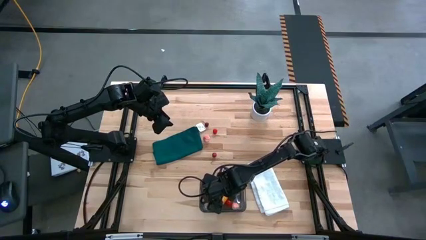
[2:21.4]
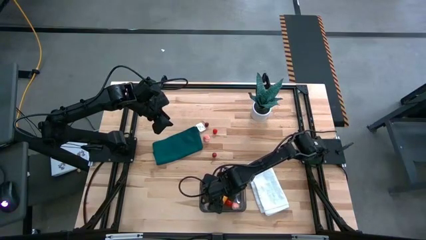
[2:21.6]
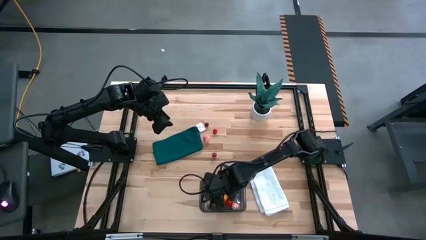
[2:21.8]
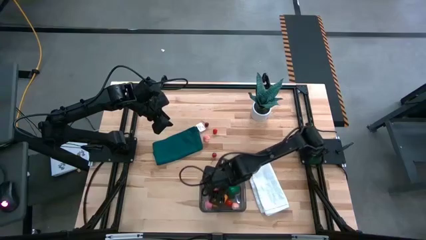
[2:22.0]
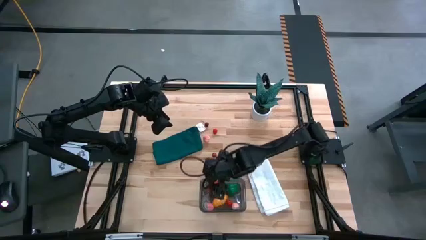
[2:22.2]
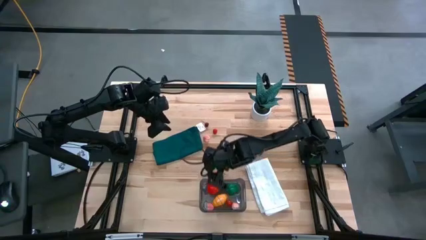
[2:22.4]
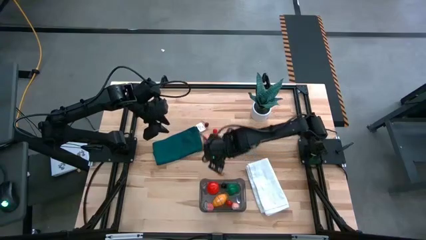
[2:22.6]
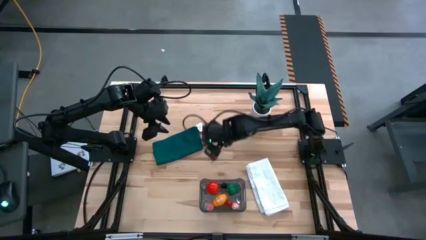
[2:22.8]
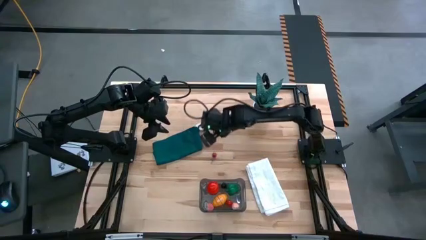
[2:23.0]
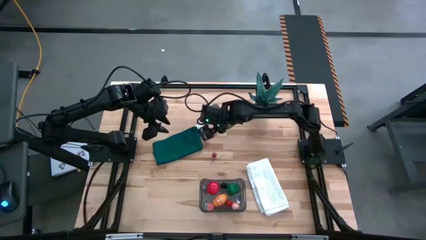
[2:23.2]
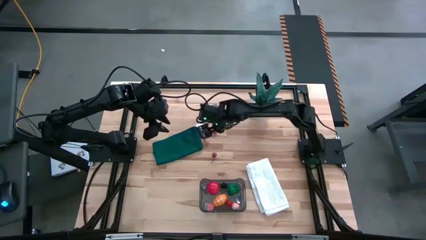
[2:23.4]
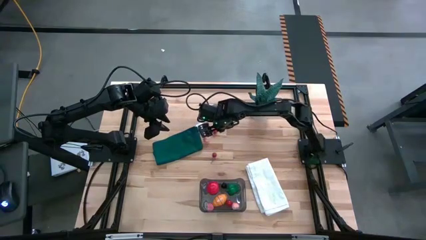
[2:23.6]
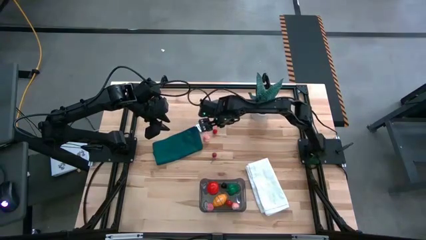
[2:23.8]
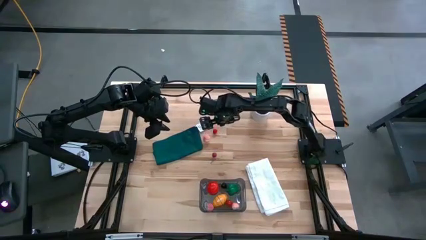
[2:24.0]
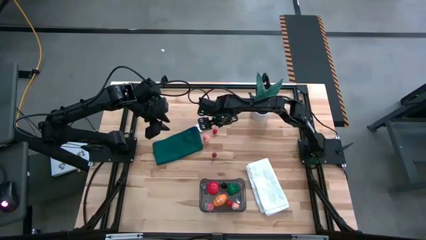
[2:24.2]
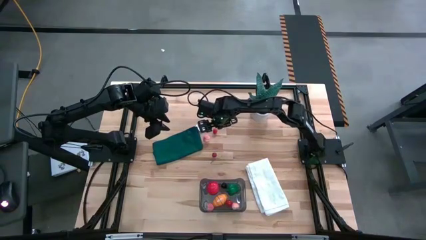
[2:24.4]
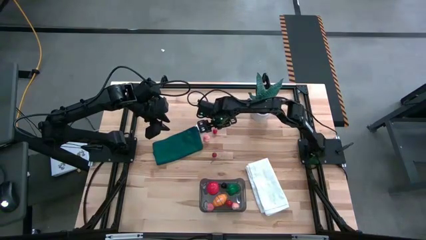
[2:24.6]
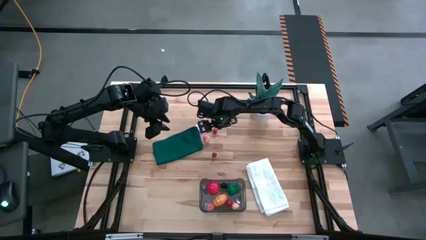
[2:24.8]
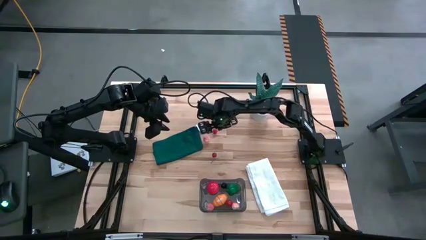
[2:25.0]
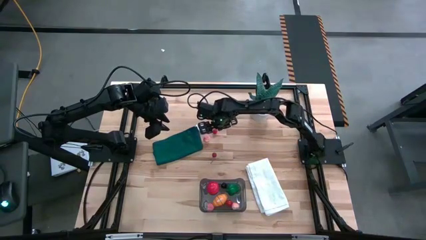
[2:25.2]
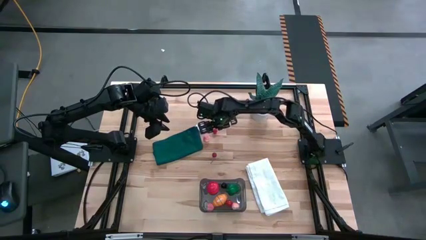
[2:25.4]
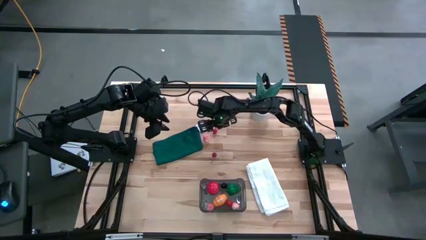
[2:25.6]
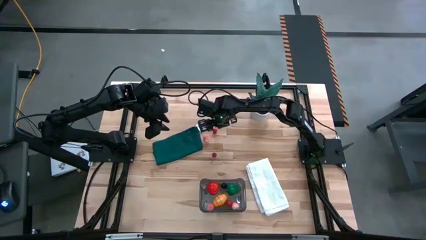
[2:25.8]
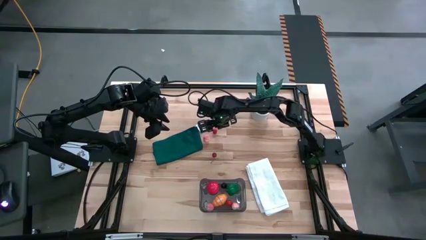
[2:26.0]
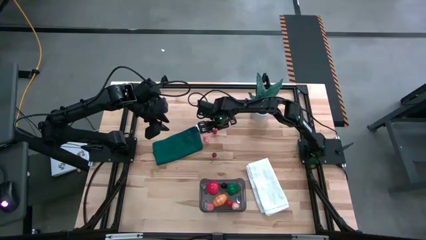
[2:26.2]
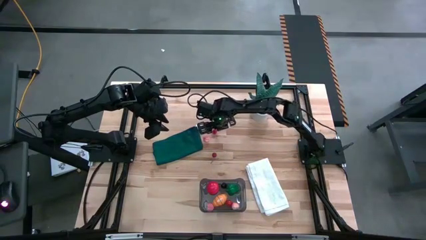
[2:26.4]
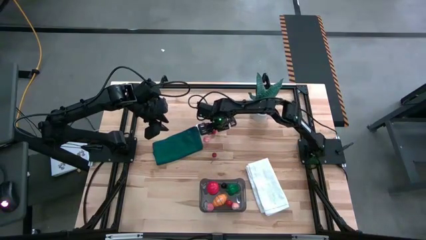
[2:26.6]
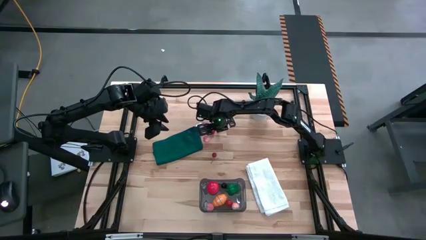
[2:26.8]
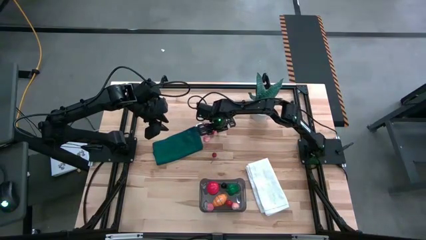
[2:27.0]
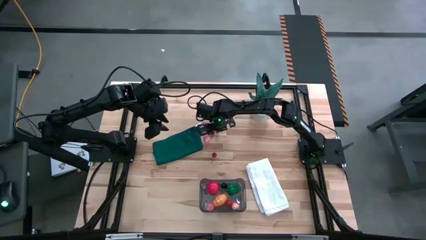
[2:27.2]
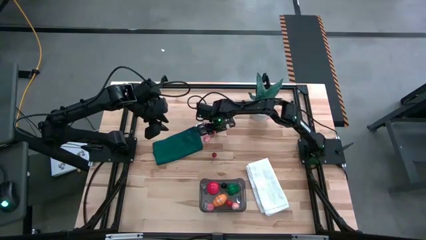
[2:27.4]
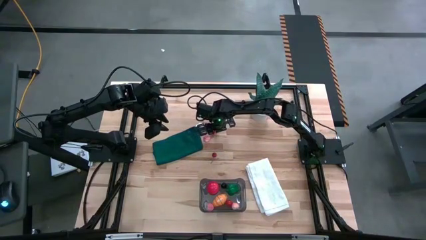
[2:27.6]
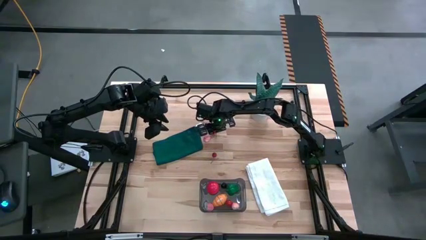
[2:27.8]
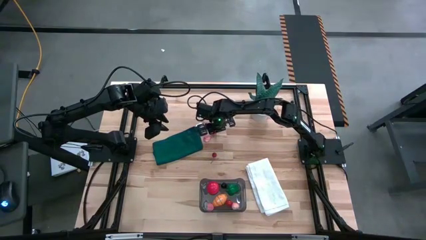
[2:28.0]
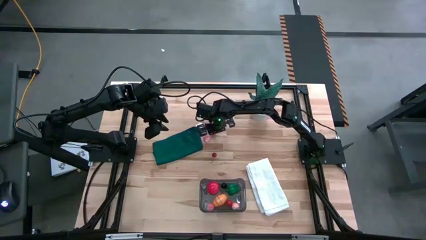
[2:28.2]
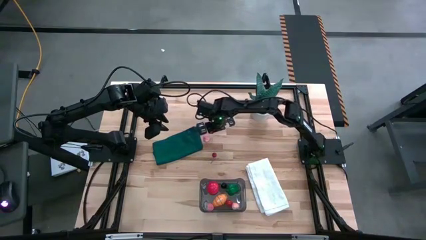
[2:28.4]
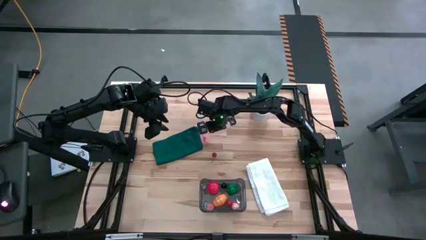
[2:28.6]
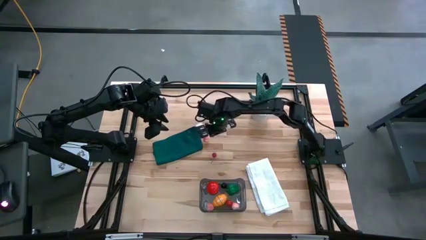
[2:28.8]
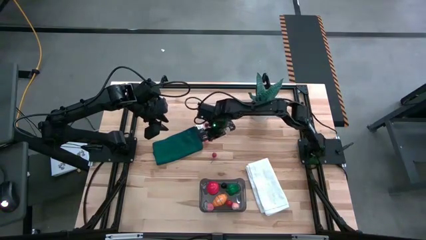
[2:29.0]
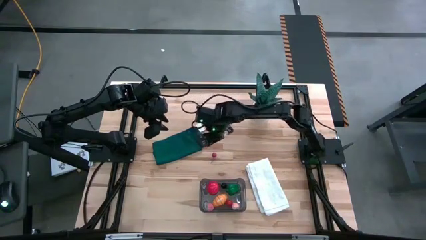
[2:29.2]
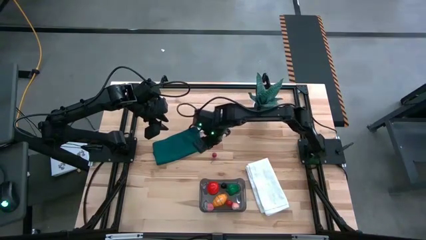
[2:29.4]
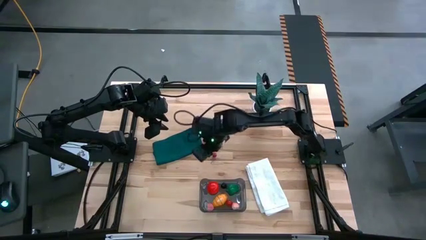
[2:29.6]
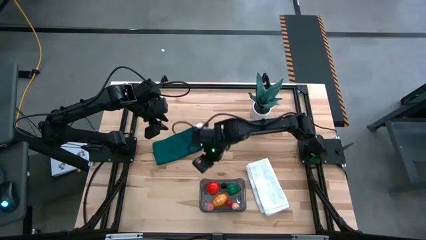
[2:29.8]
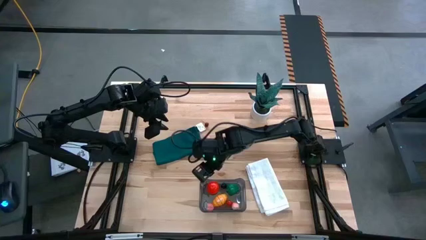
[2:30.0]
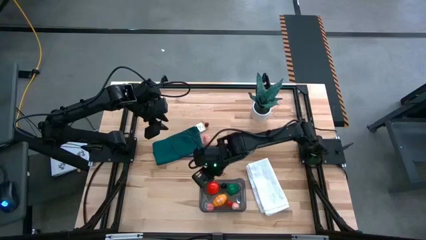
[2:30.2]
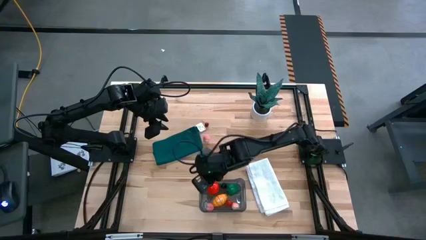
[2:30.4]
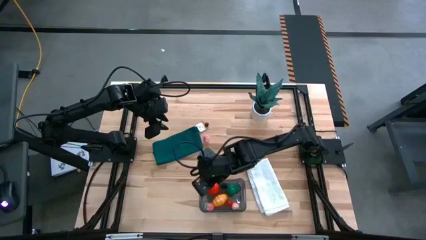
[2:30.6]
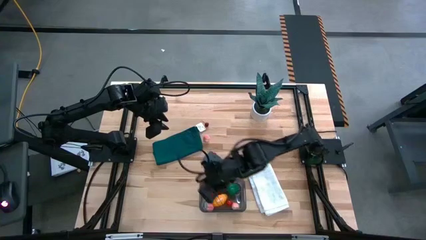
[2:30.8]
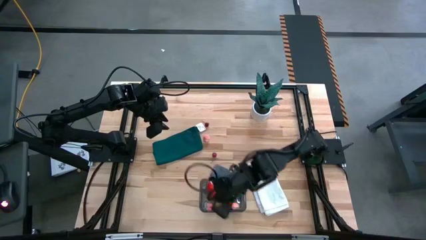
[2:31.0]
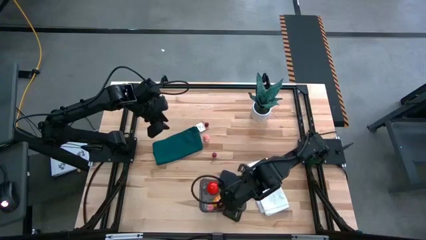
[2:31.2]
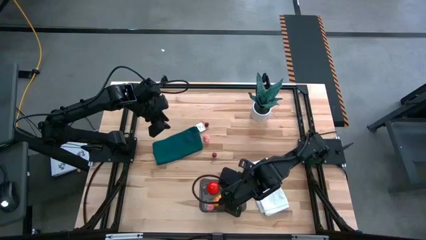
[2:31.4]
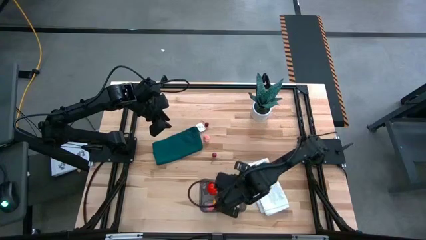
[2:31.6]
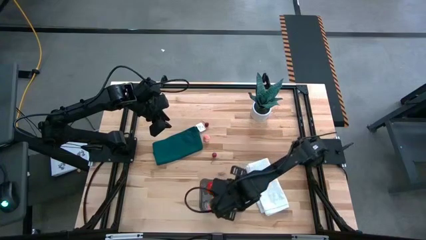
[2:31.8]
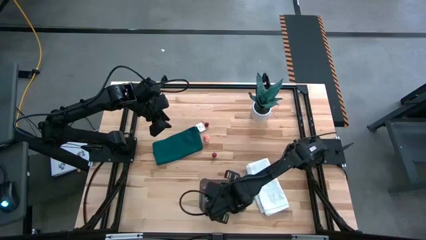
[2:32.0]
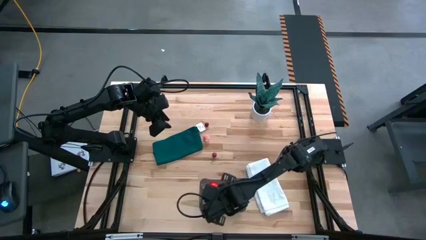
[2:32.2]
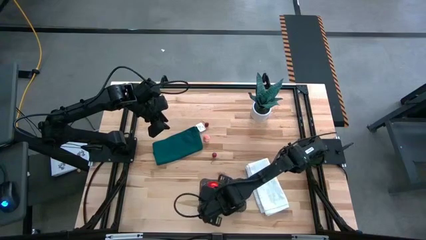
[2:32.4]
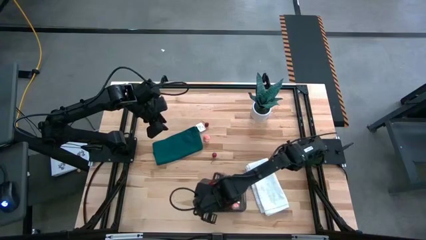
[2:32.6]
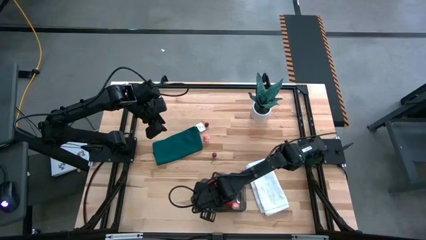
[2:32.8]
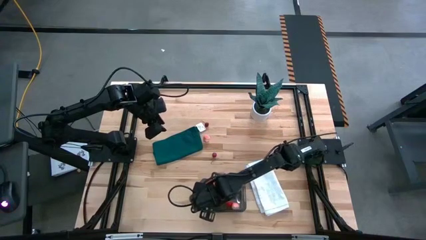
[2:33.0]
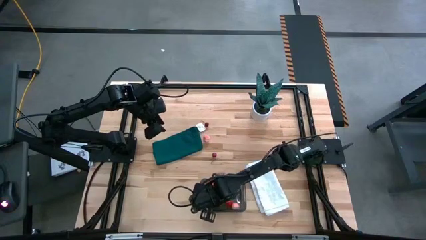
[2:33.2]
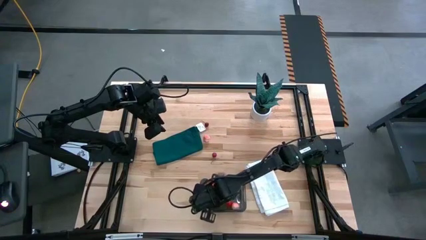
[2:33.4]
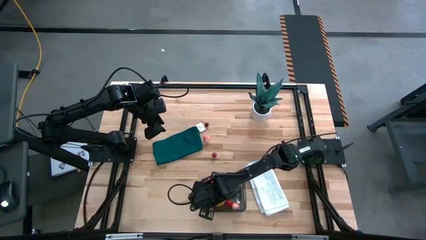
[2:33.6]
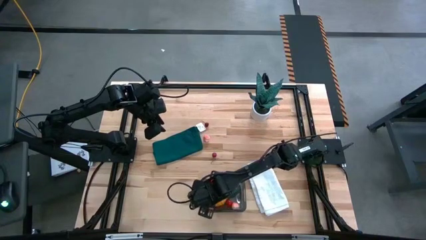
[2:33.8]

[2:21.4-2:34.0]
Task: Pick and placing Produce into tupperware
Put the red raspberry into the black bin
